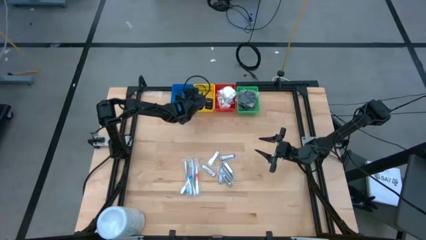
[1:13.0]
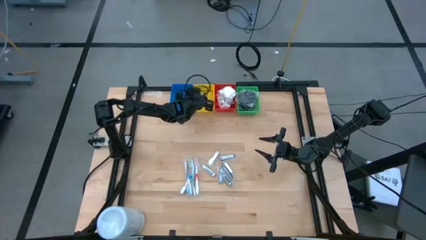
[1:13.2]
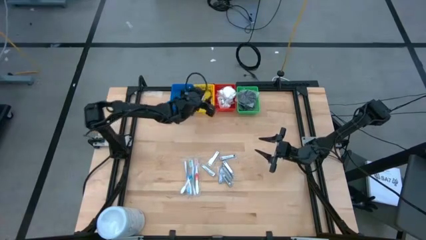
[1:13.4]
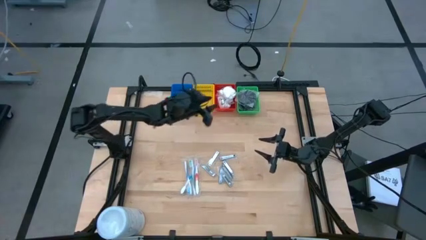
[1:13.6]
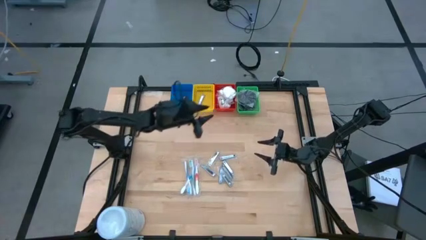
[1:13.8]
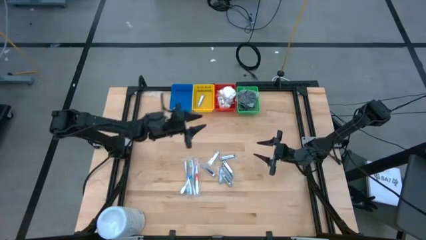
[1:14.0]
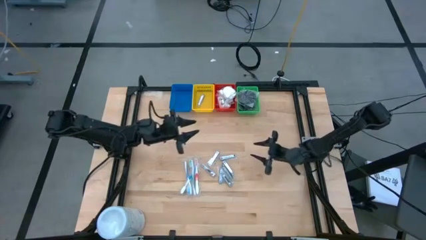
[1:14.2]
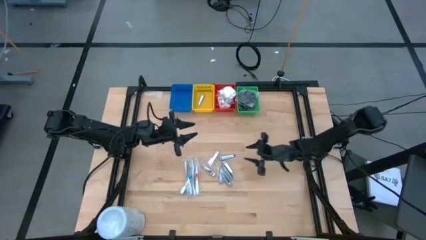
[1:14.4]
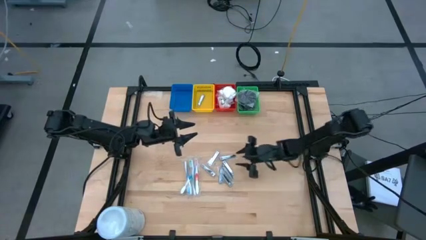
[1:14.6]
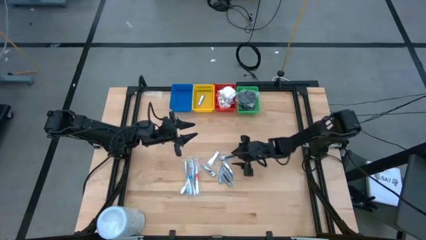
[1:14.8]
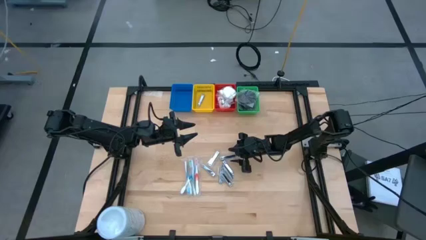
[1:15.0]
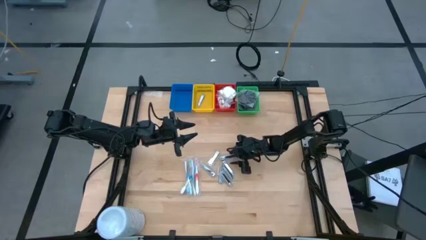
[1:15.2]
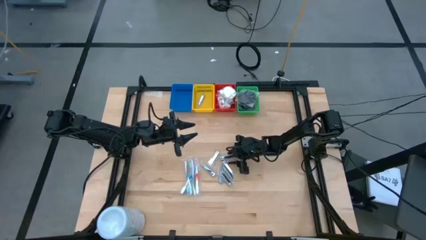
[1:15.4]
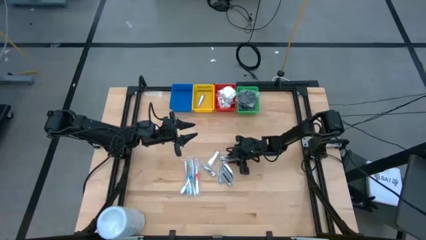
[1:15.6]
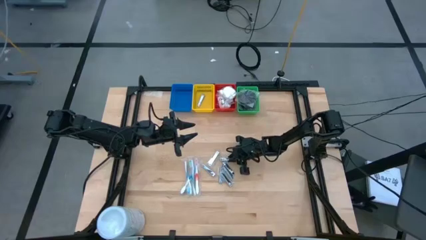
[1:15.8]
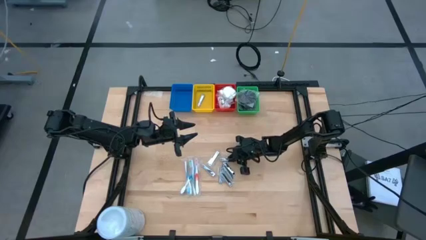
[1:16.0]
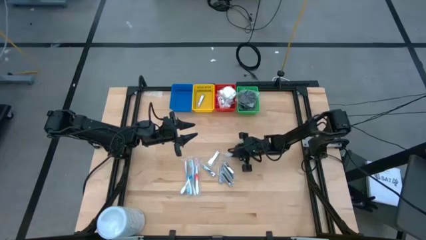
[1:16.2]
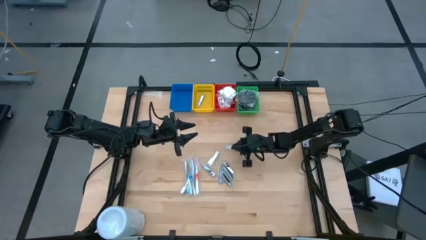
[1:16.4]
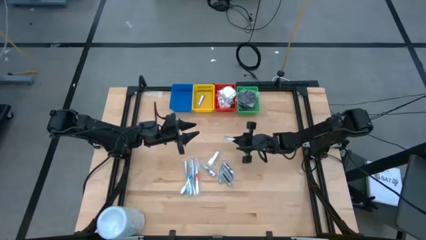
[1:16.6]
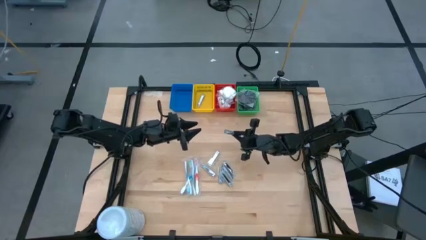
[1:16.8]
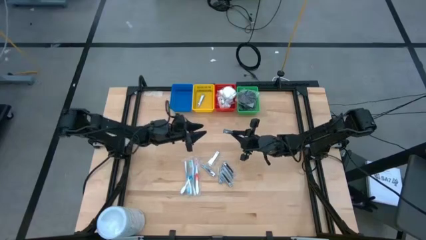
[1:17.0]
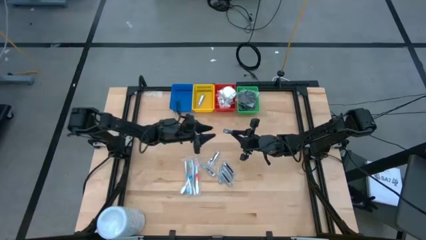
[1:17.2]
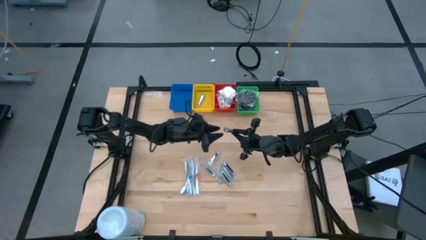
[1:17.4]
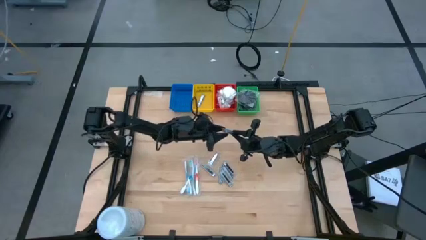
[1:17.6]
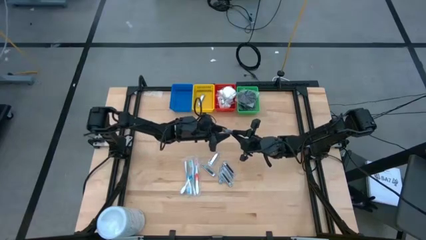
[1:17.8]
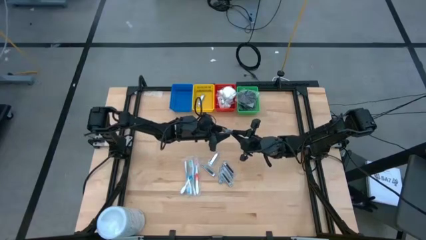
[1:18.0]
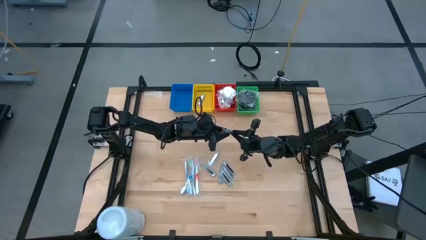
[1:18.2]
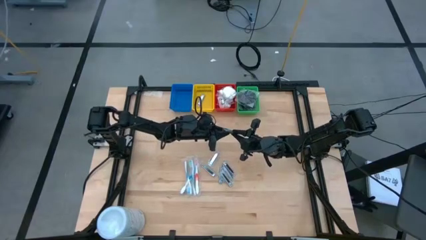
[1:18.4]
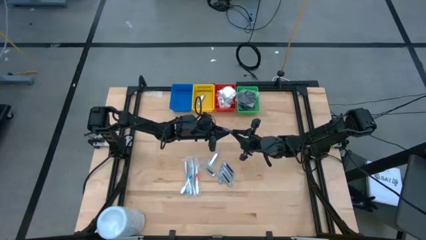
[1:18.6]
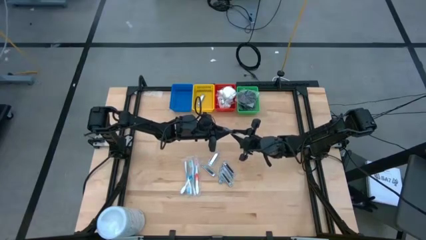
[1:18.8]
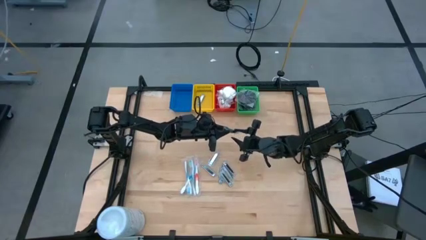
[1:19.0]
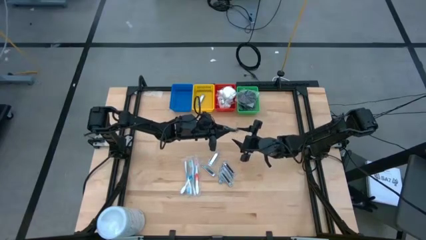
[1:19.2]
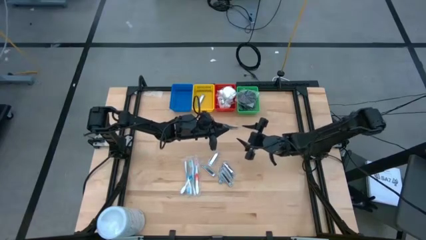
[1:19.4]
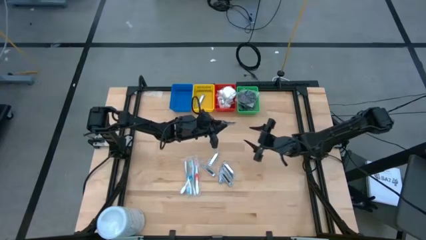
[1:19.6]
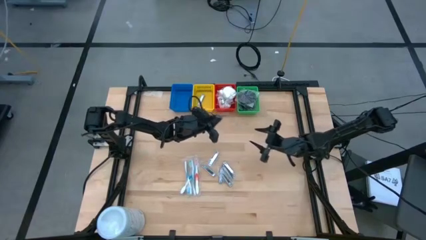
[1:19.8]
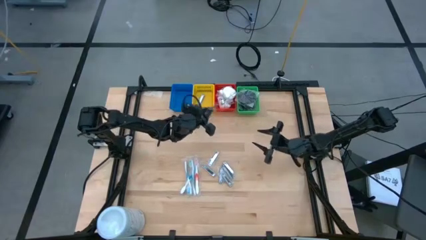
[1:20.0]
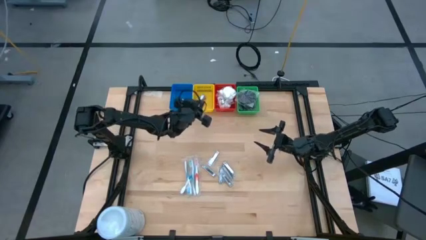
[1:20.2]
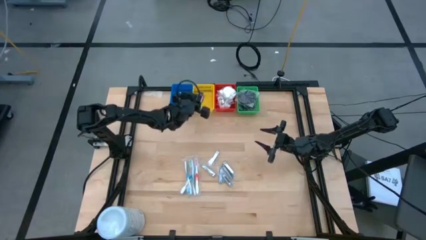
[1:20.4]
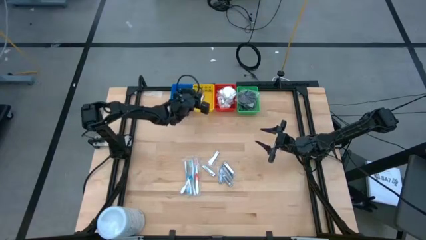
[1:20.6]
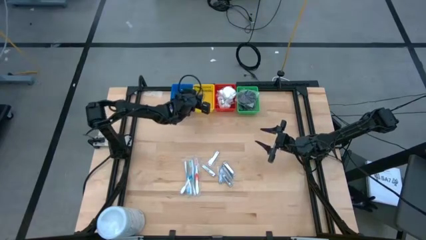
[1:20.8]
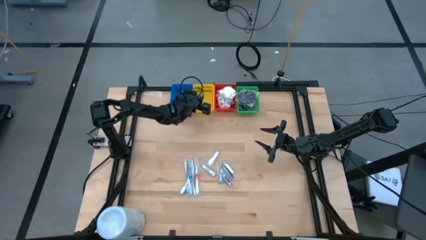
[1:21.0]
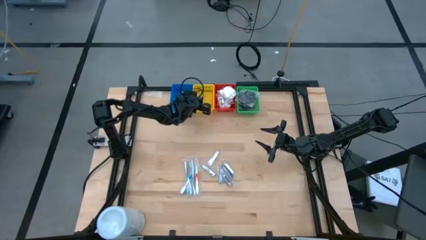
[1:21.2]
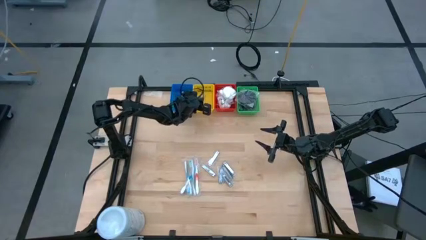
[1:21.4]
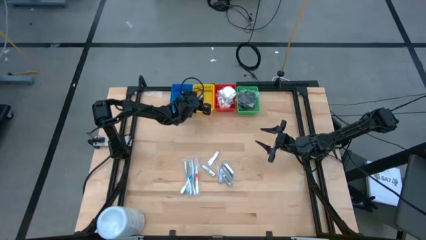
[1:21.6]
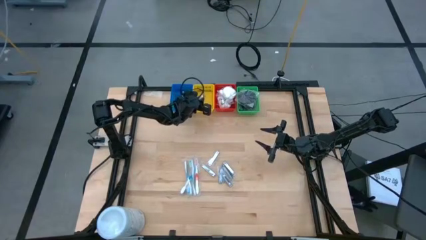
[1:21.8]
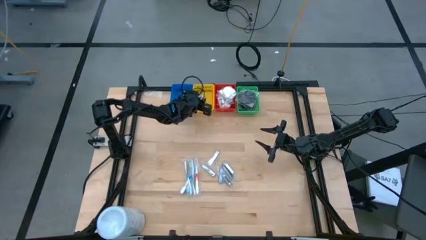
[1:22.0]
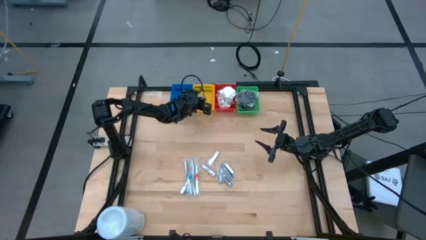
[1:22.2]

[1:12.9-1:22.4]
Task: Pick & Place Travel size toiletries
Put the nail cutter into the yellow bin

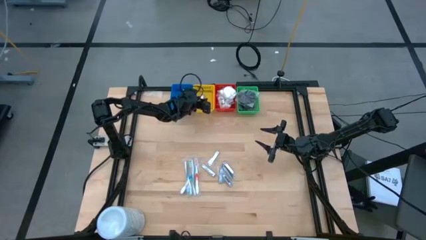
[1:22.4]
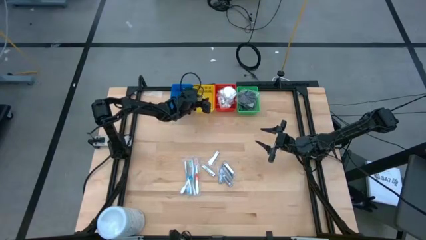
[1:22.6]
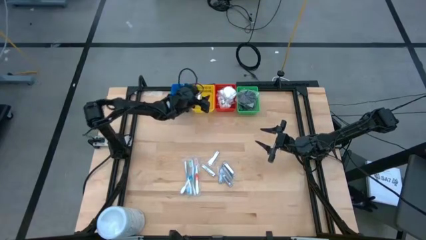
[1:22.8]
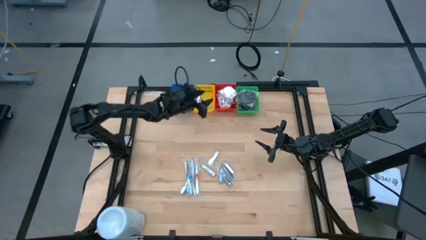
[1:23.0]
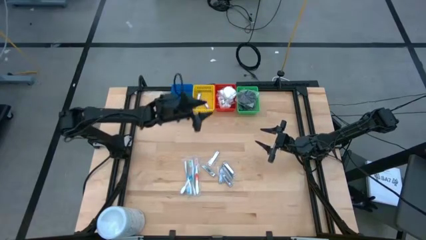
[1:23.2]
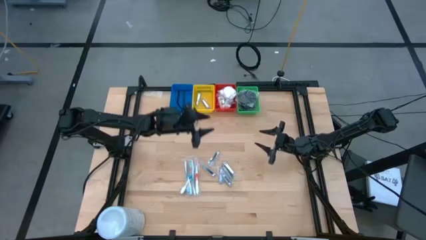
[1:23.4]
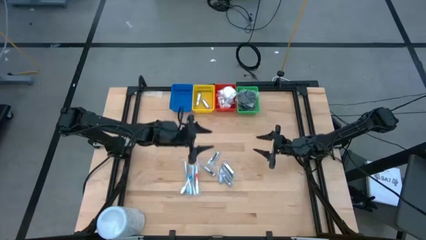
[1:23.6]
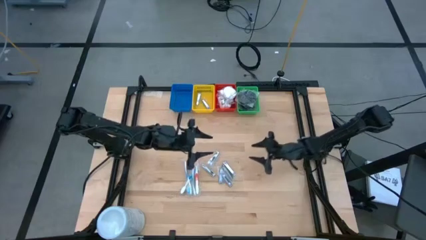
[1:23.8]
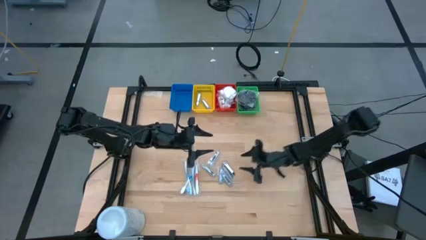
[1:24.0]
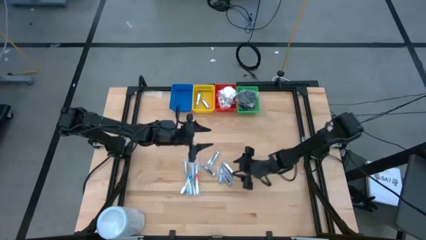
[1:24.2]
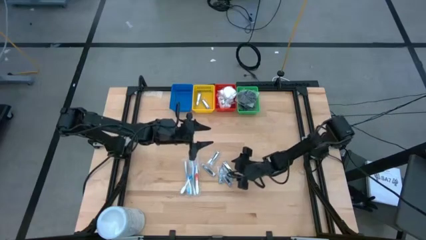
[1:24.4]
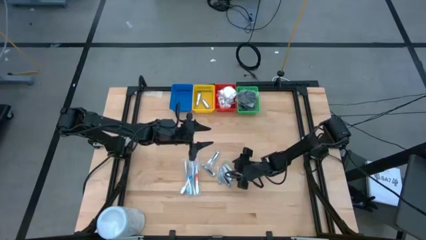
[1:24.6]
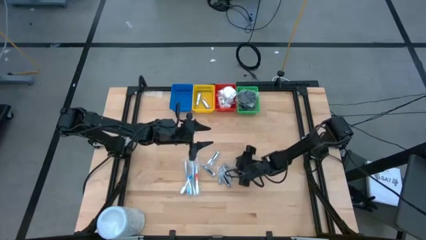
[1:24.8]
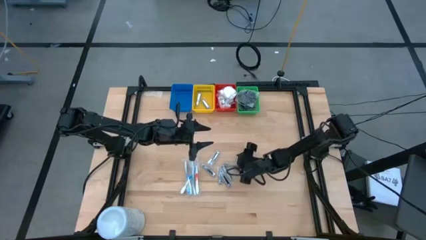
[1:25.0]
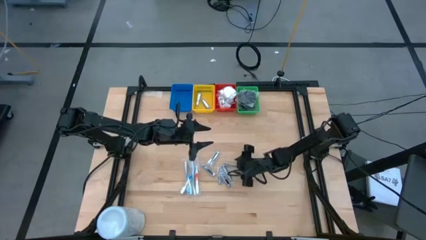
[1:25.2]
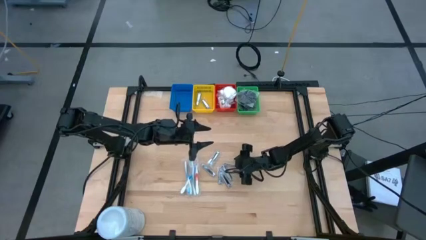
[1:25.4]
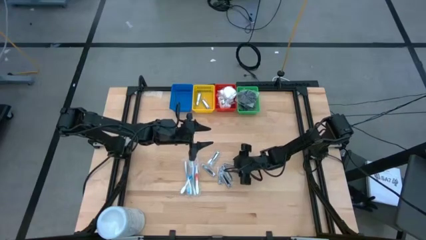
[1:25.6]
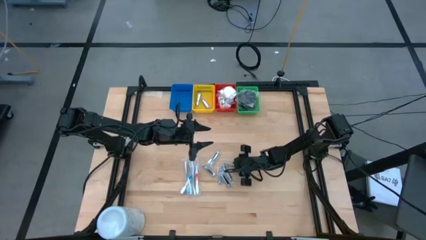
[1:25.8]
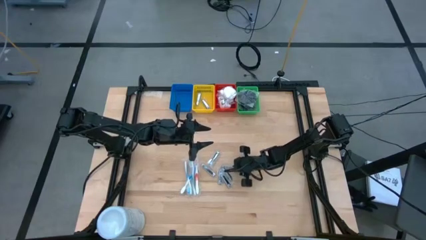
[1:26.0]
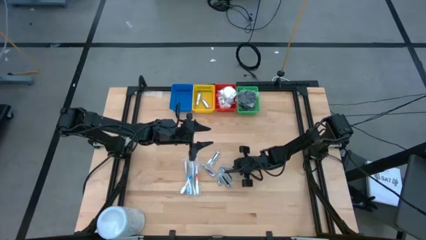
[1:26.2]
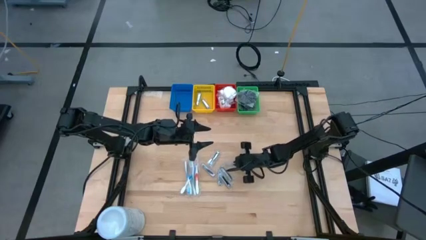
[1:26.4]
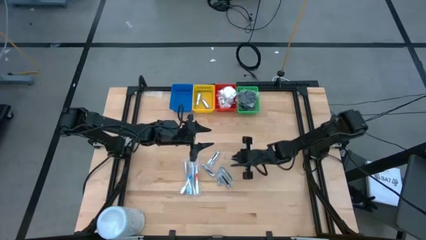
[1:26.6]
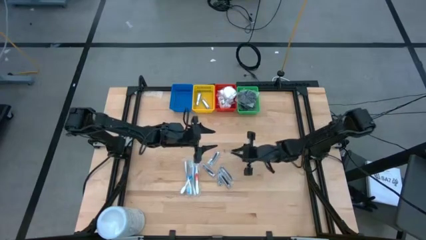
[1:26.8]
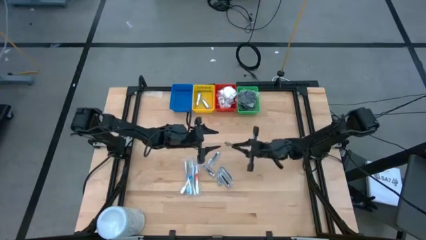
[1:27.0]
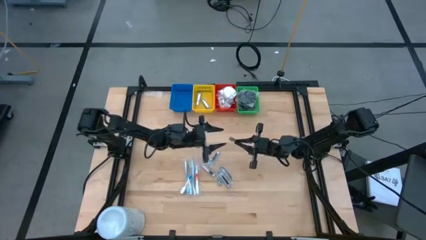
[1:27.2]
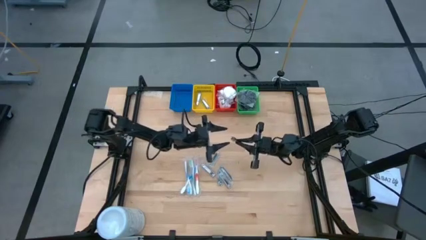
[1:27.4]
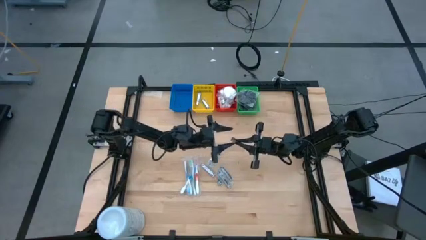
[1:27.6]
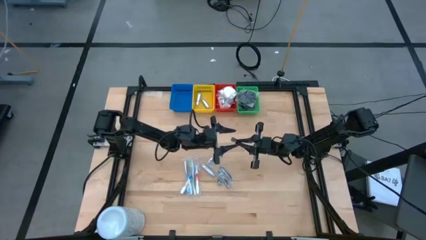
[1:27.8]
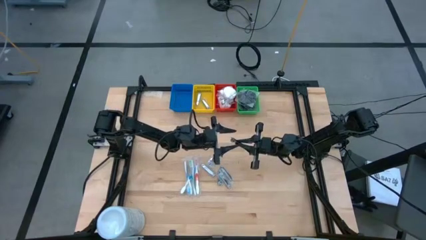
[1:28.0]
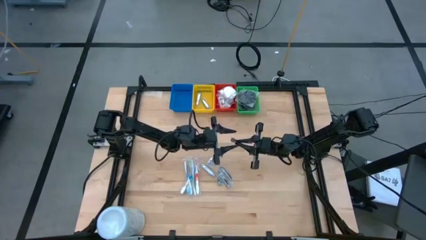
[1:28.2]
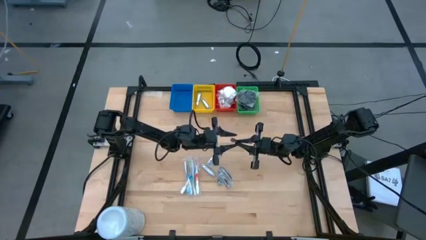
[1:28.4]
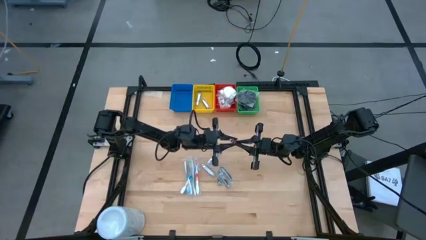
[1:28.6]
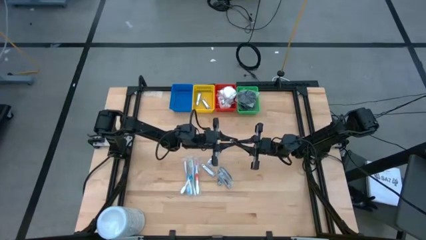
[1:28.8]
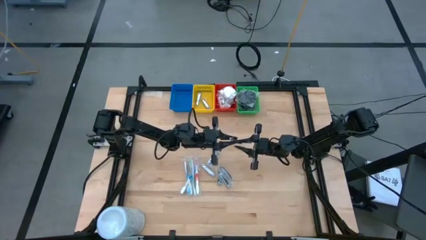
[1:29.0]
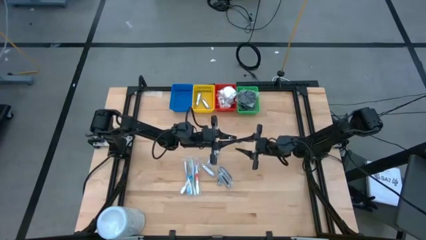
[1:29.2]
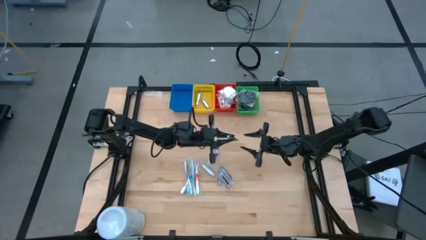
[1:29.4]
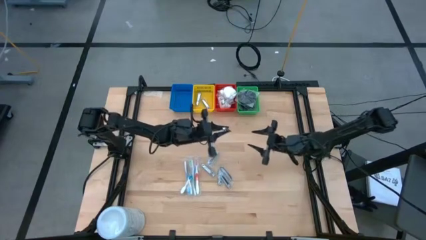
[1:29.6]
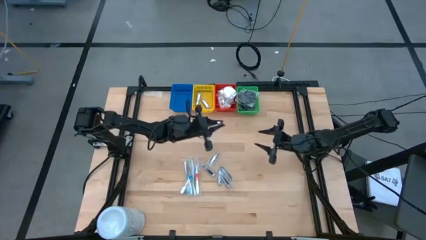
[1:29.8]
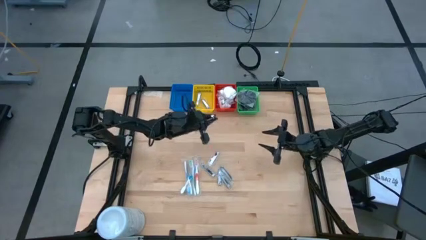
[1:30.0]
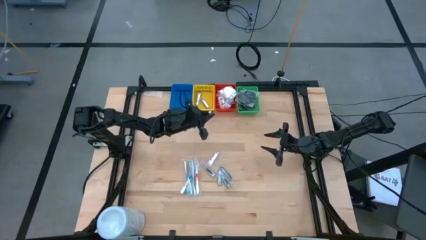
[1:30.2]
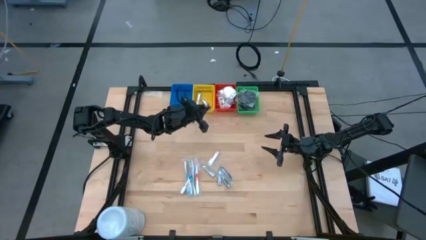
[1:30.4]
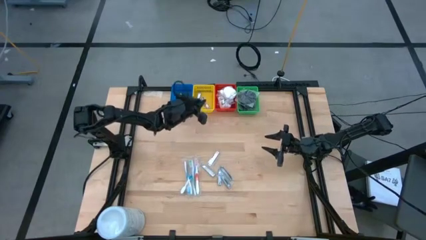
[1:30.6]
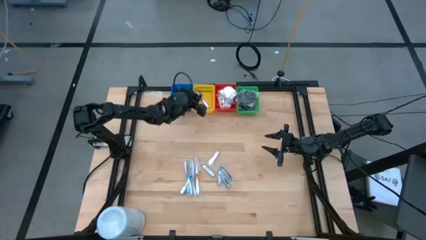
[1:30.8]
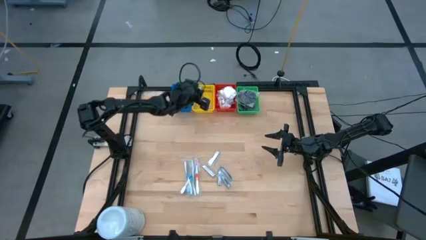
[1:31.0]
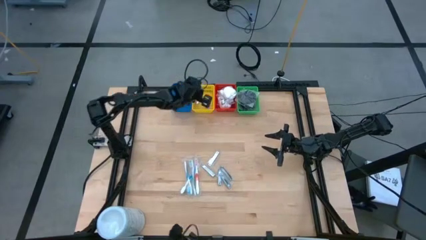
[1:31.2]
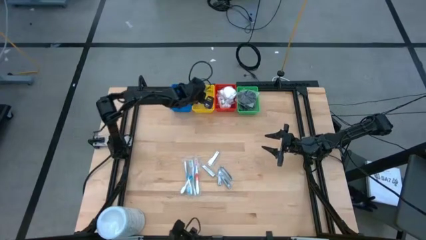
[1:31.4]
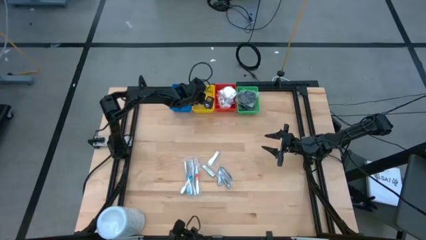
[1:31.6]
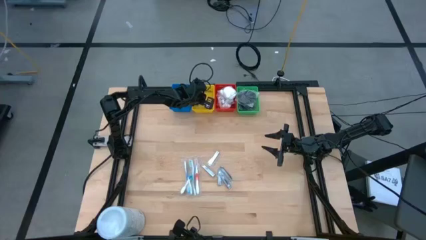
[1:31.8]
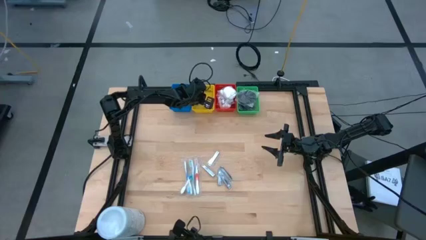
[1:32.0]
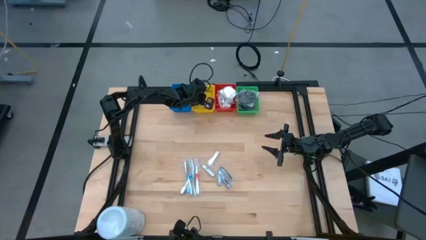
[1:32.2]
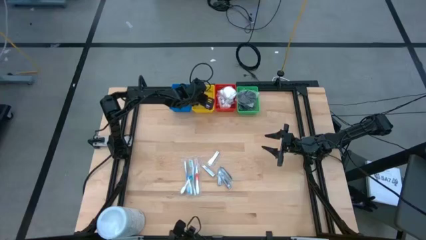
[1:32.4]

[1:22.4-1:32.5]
Put the nail cutter into the yellow bin
